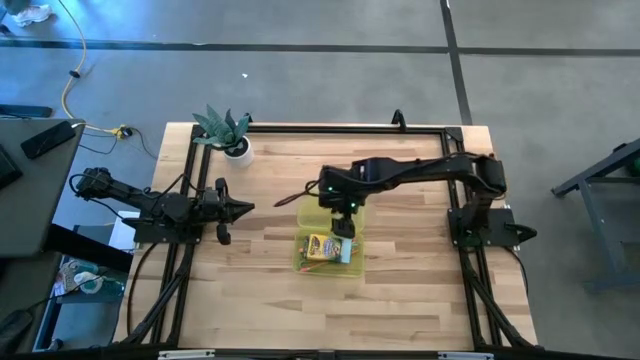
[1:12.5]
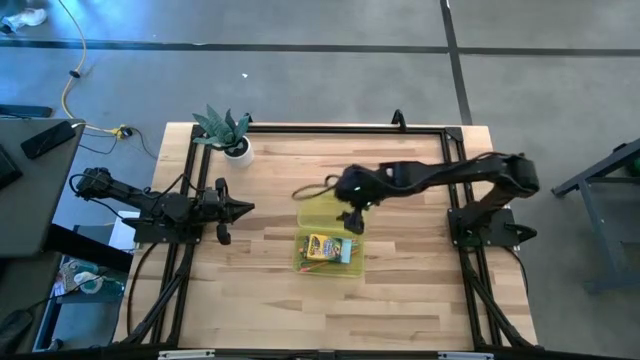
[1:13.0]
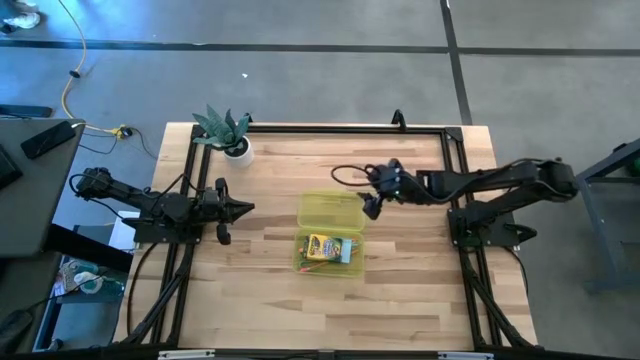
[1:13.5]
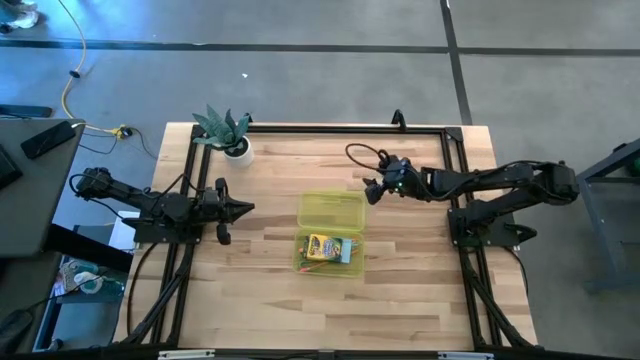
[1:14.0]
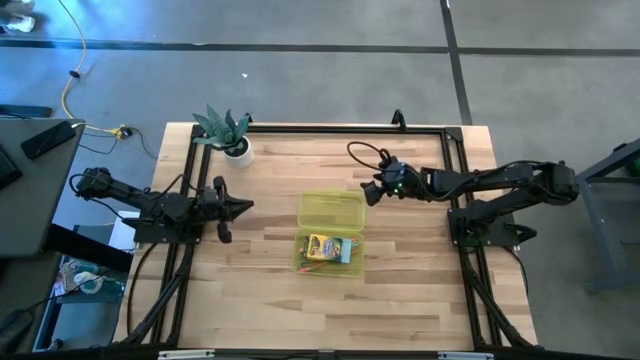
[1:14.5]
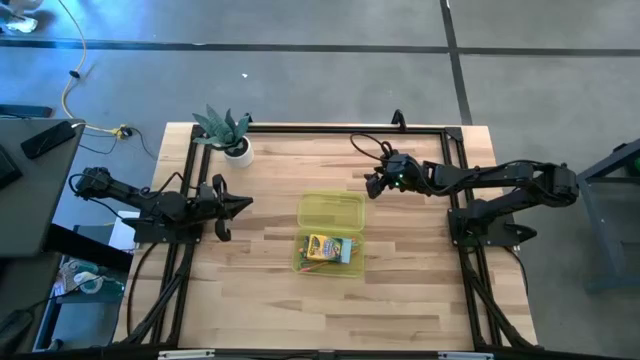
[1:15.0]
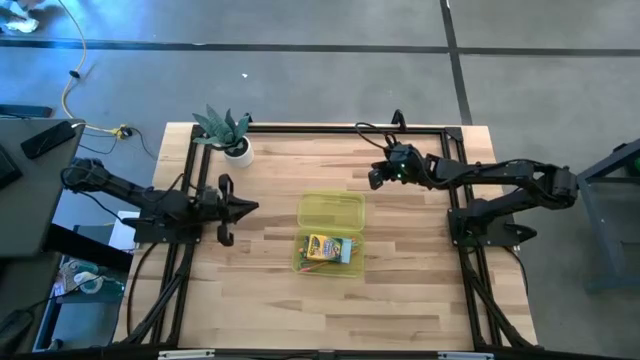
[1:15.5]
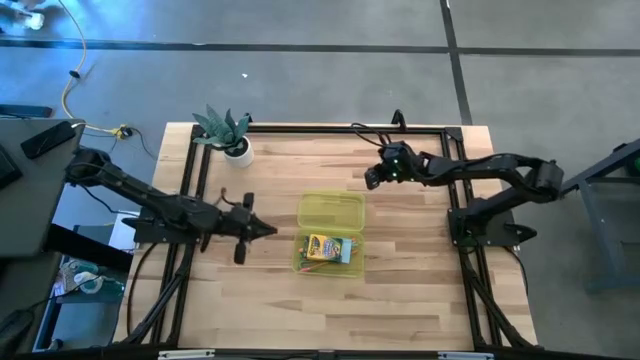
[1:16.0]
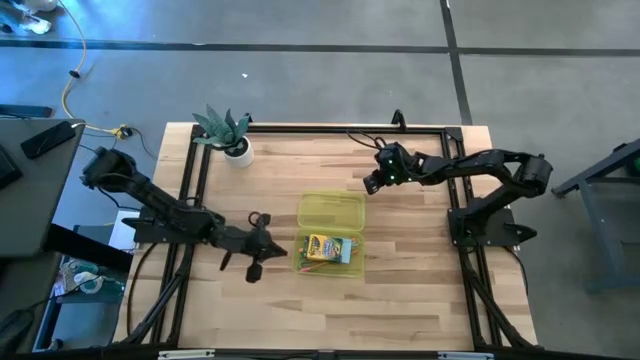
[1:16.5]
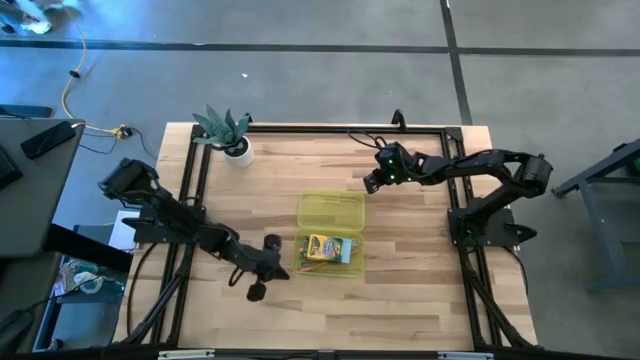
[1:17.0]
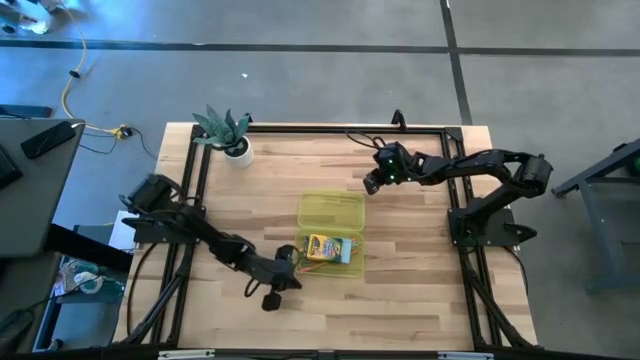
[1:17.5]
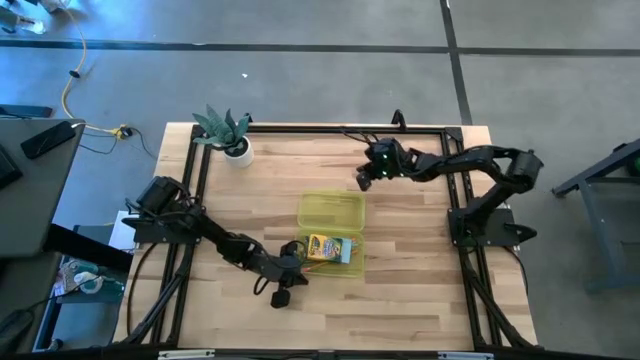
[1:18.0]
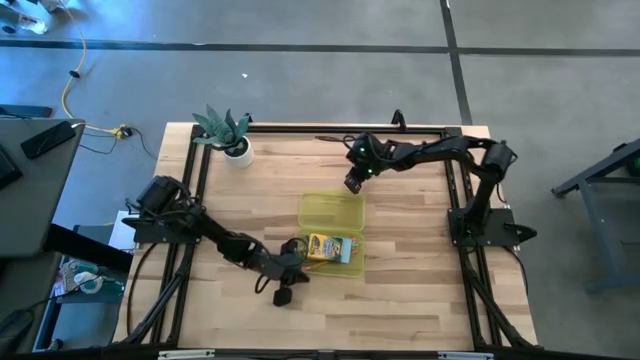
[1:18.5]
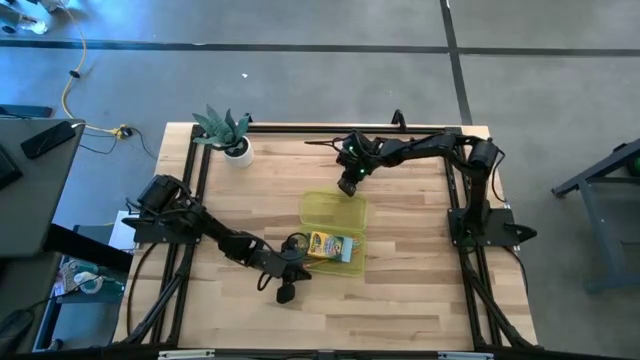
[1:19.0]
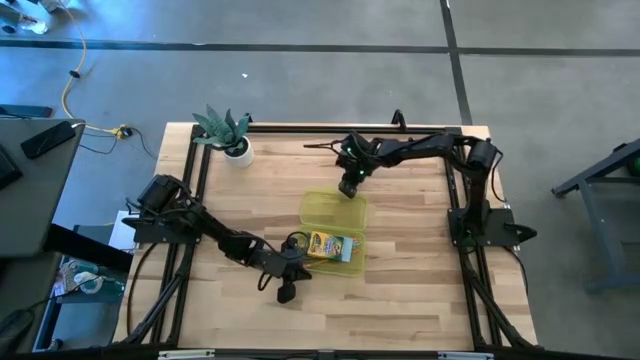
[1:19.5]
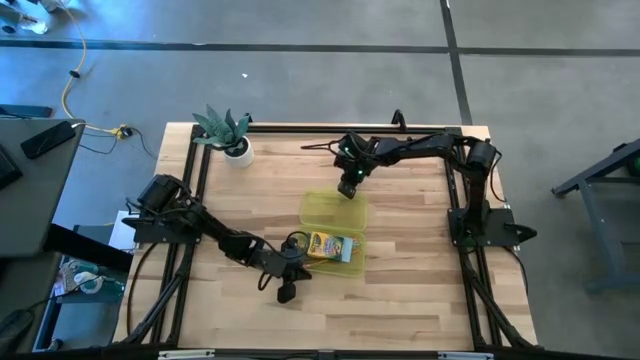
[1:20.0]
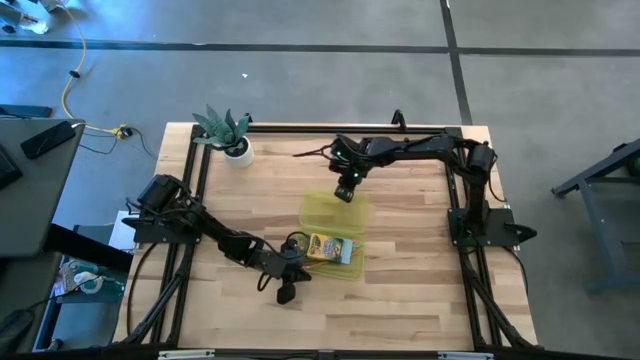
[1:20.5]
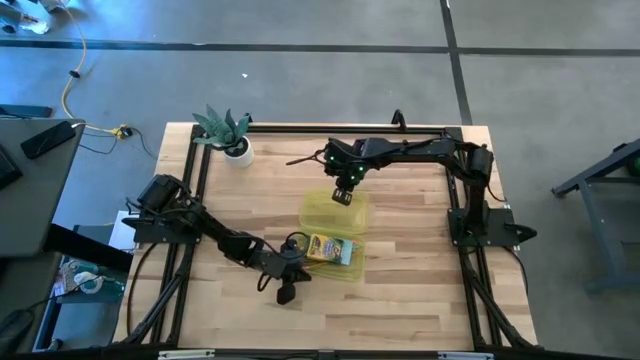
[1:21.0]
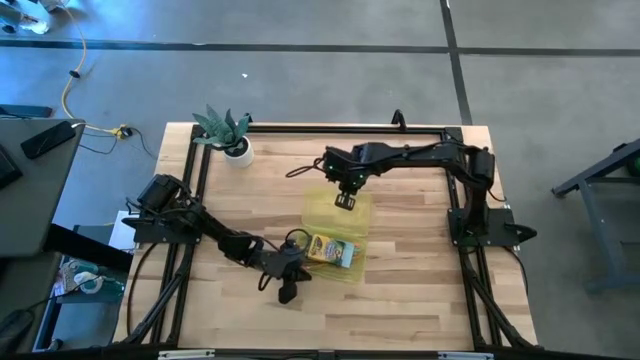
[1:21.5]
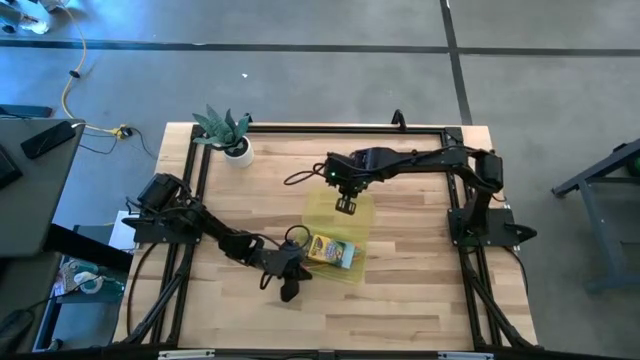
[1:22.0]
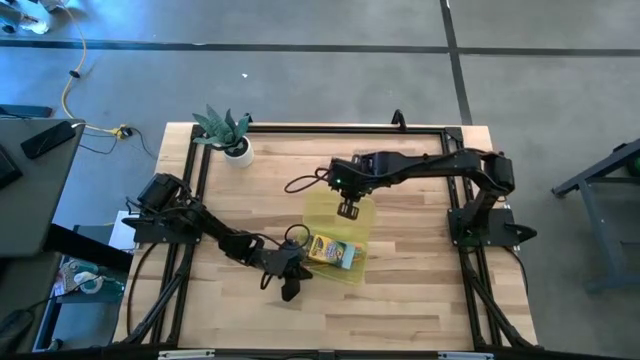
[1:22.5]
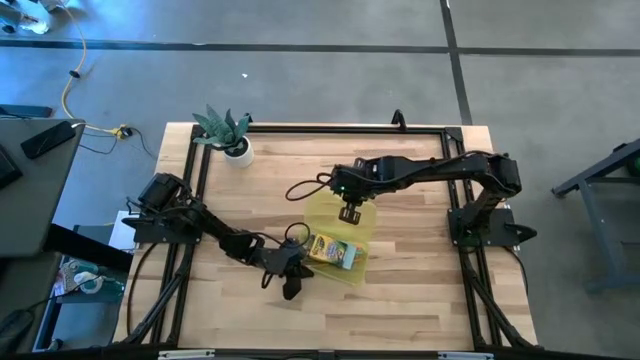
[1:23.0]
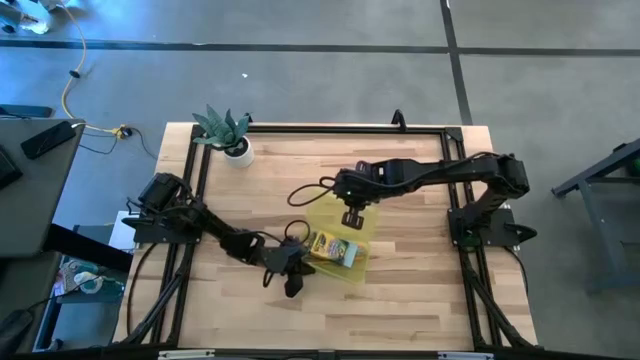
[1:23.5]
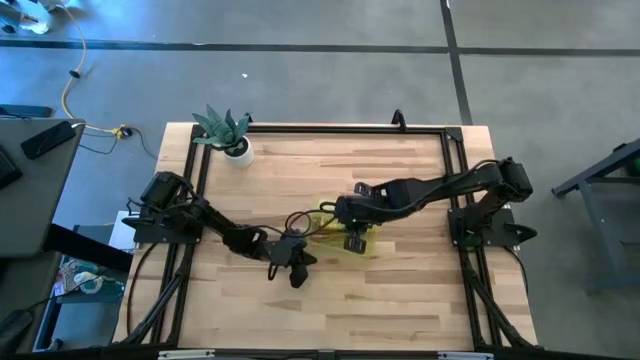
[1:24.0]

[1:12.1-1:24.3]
Task: Pack school essentials
Close the yellow box

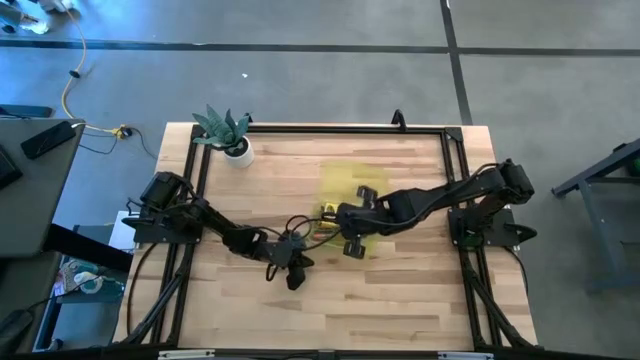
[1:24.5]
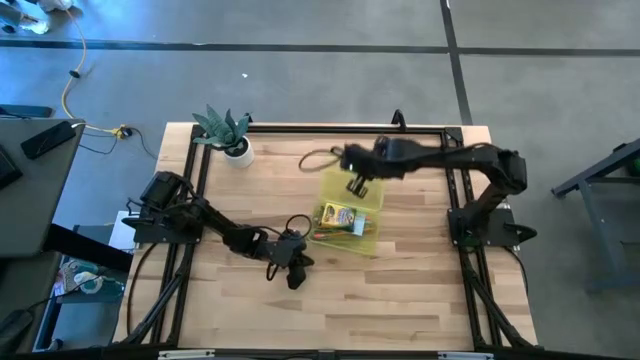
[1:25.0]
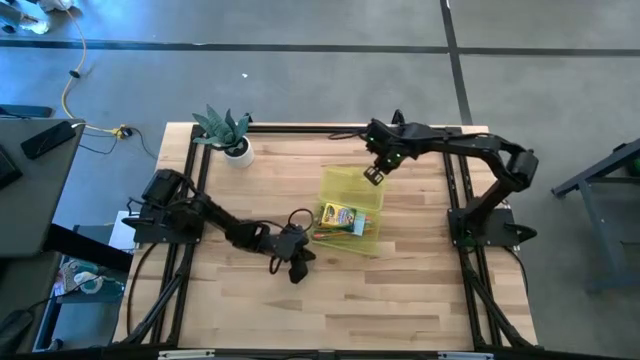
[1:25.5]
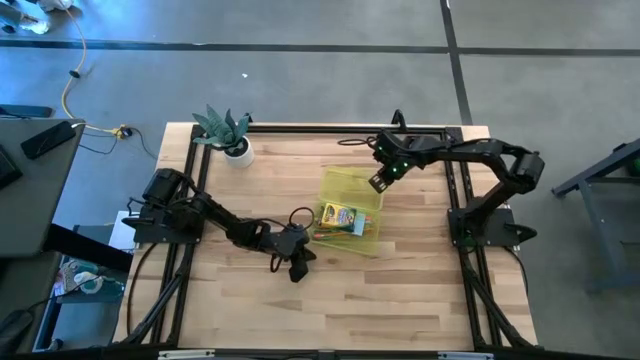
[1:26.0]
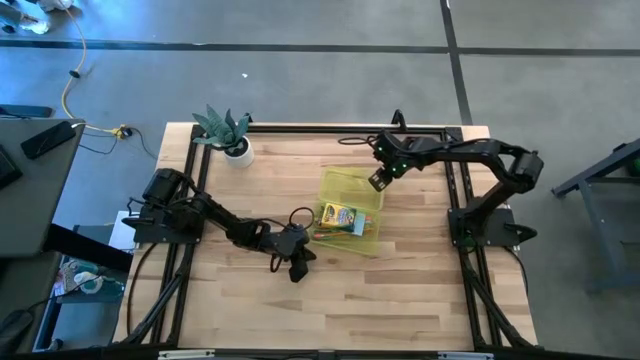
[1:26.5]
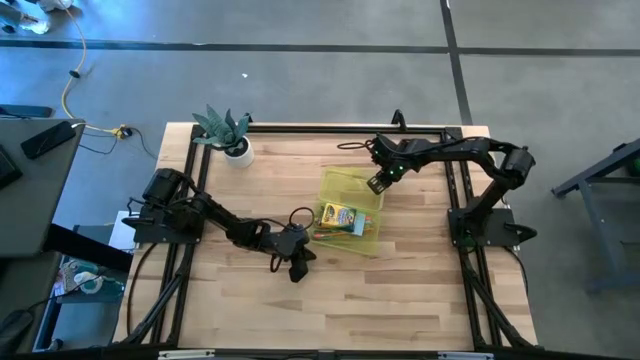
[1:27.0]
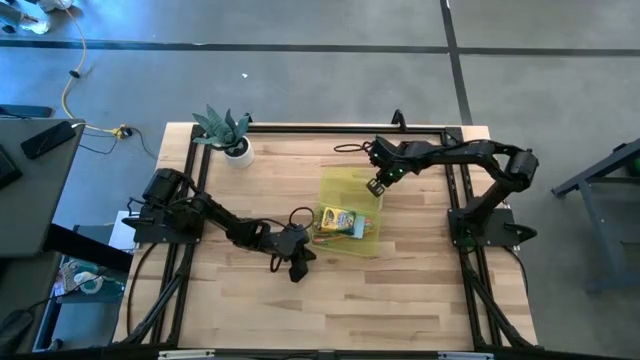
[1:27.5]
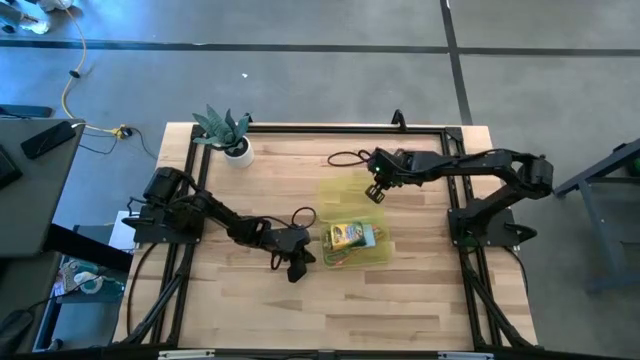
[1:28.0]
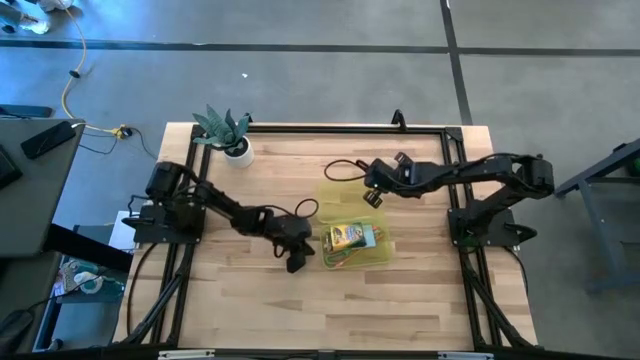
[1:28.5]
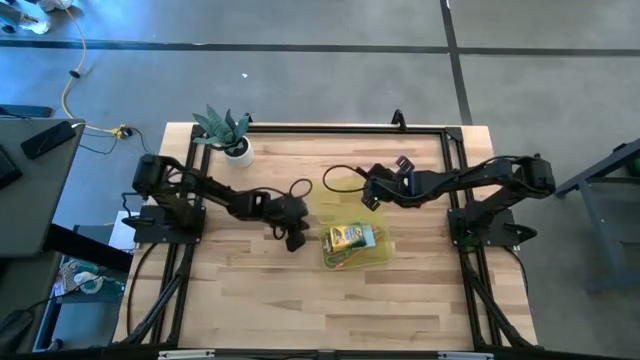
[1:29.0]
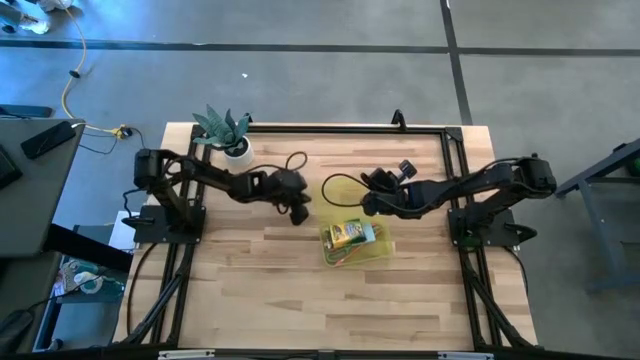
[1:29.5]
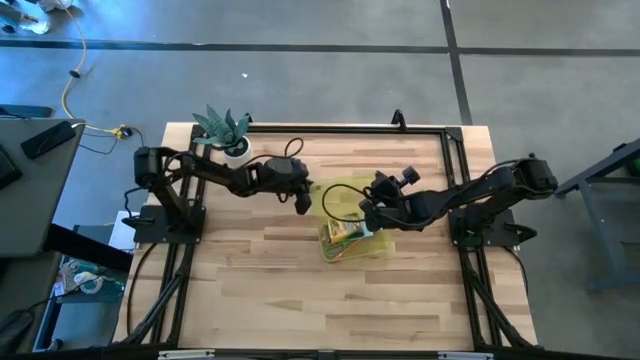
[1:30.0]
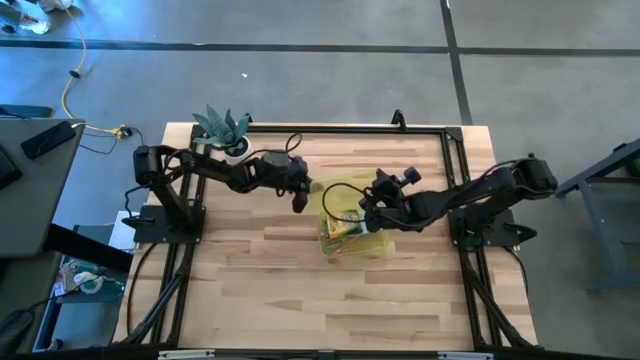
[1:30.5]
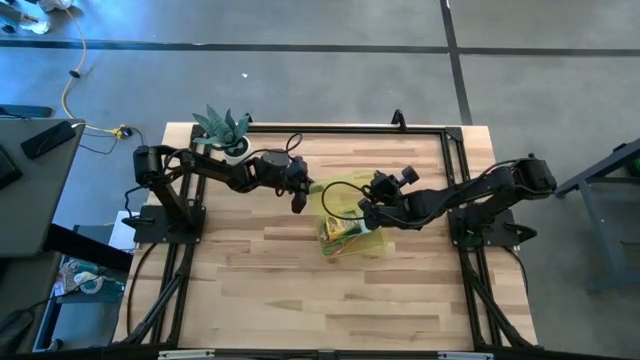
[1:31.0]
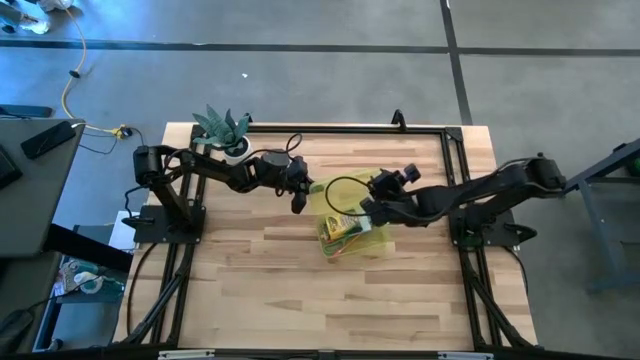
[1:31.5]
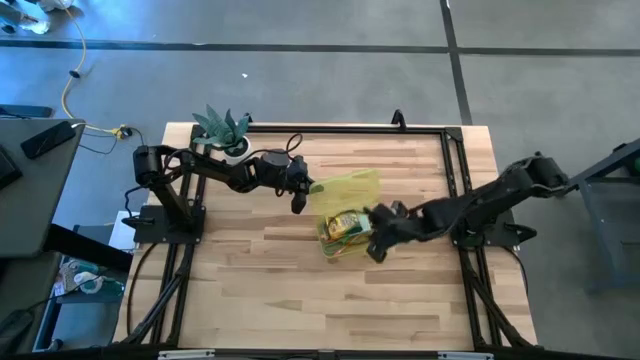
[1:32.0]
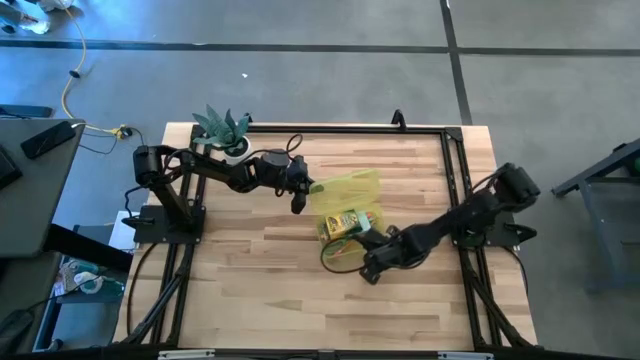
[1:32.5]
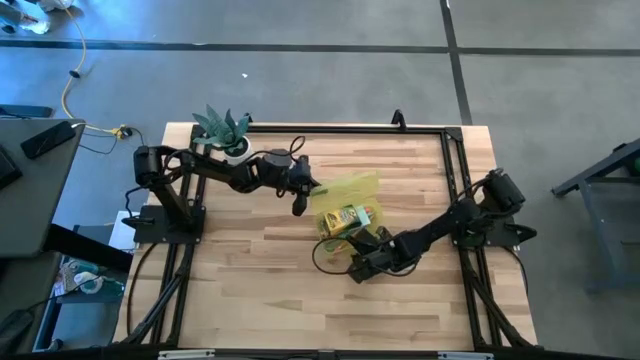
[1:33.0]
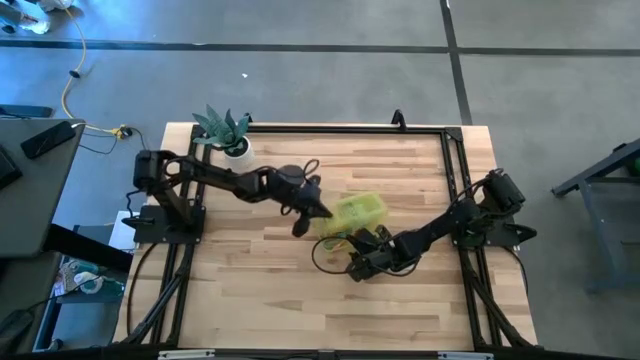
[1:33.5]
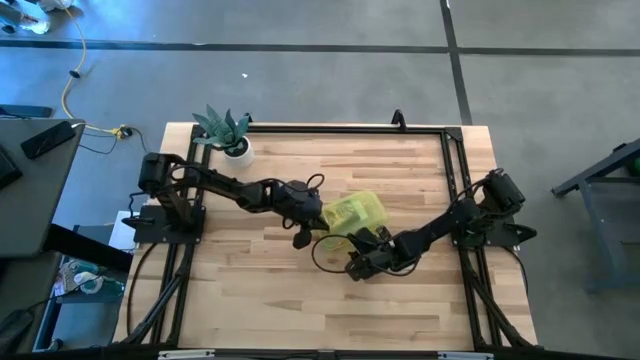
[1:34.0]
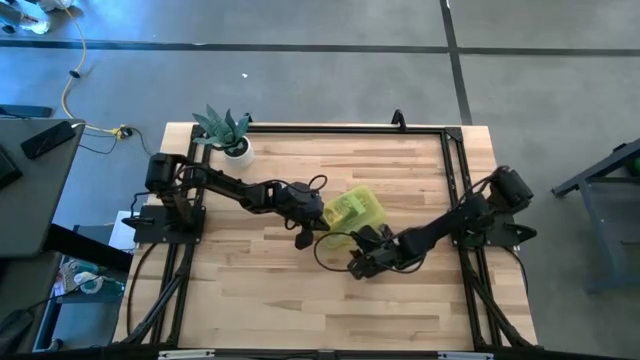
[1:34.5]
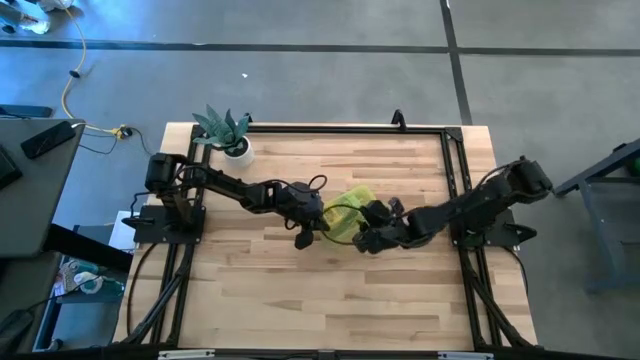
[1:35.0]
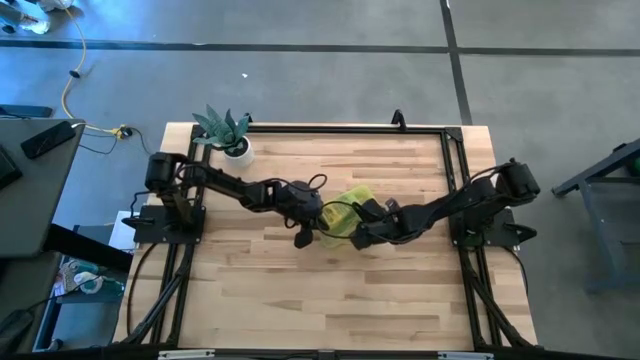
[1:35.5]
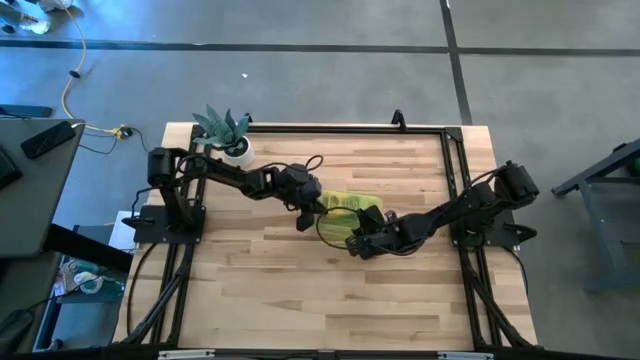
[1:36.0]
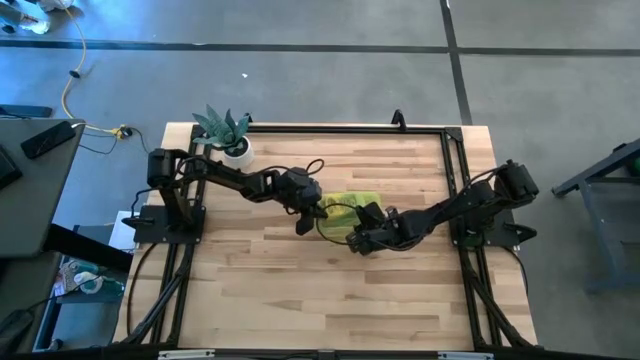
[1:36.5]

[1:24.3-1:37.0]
Close the yellow box
